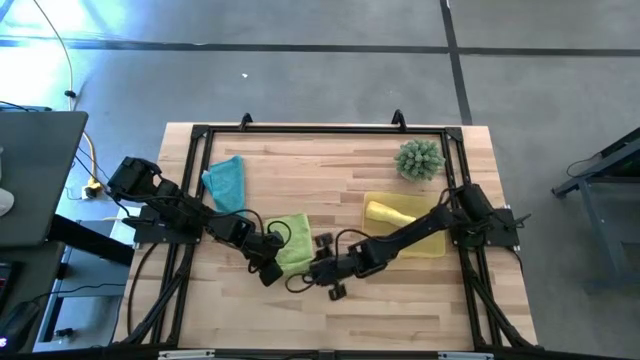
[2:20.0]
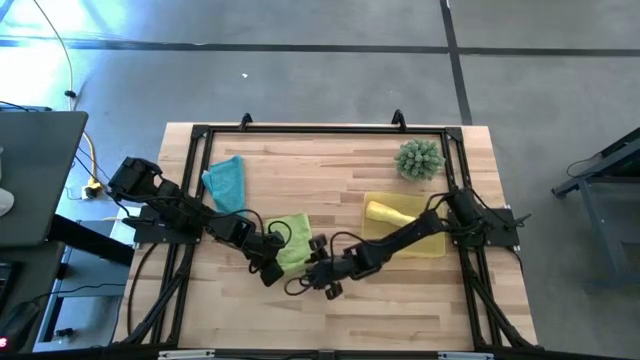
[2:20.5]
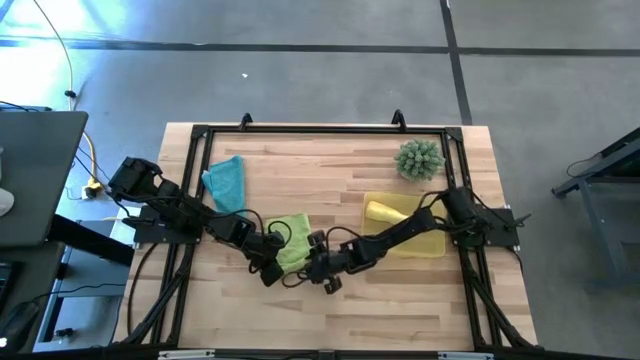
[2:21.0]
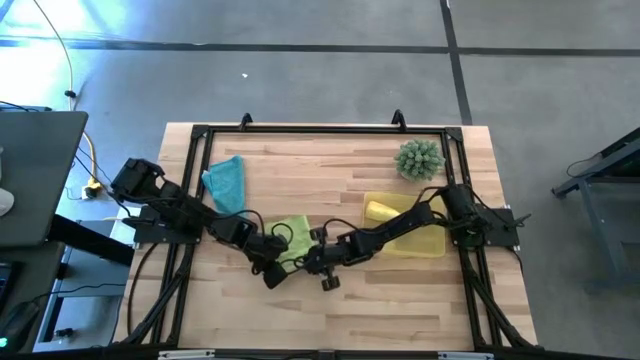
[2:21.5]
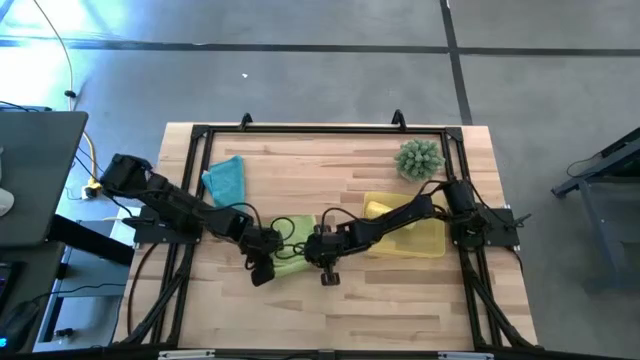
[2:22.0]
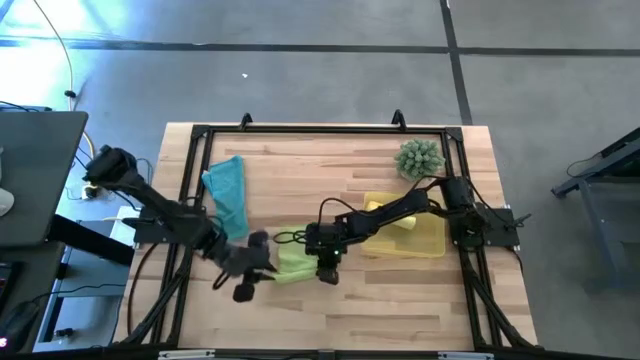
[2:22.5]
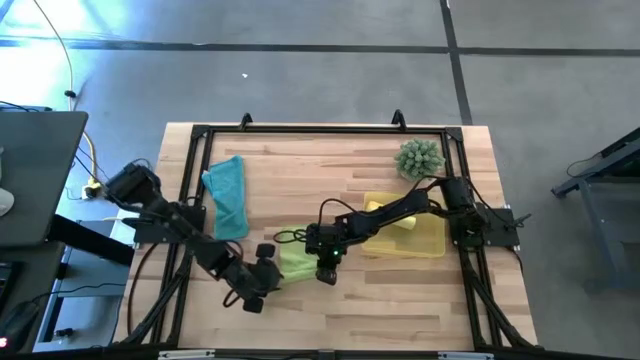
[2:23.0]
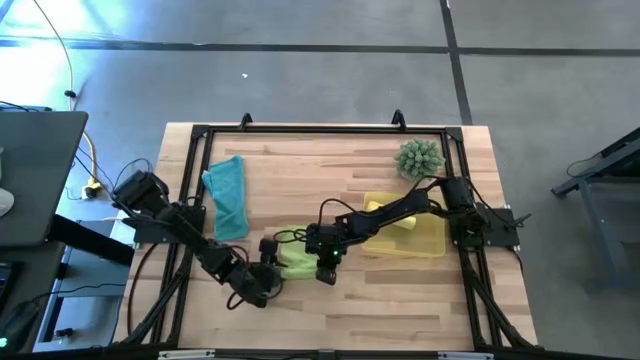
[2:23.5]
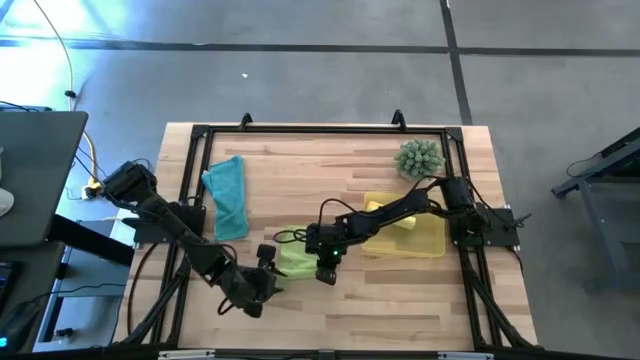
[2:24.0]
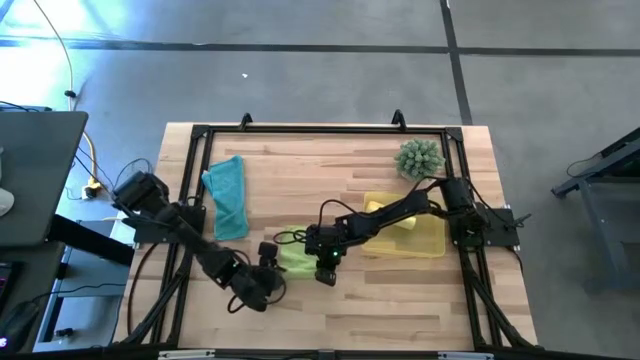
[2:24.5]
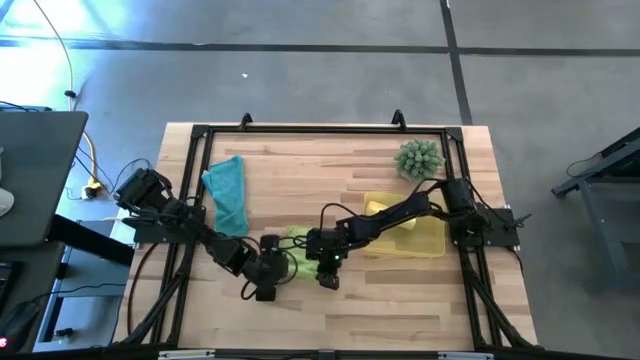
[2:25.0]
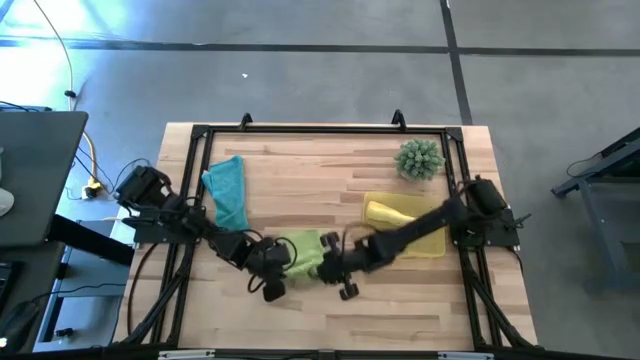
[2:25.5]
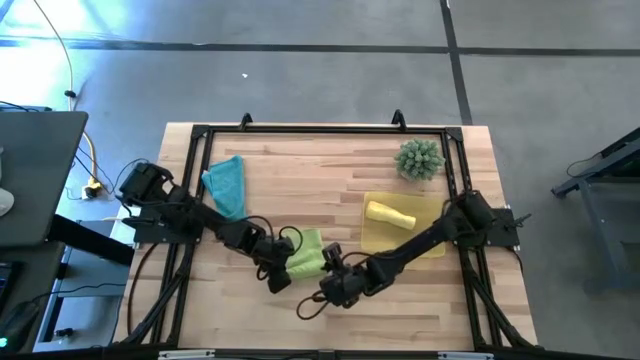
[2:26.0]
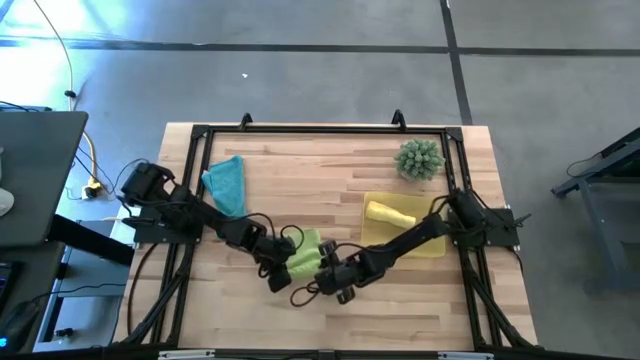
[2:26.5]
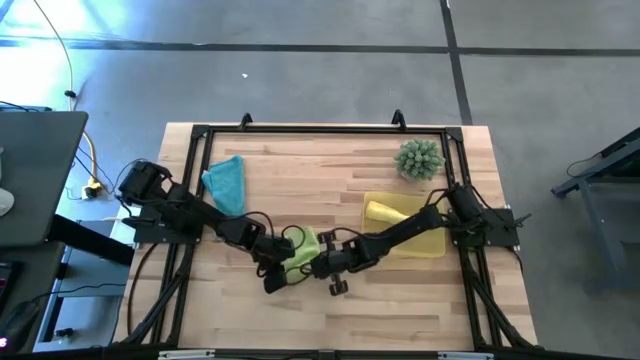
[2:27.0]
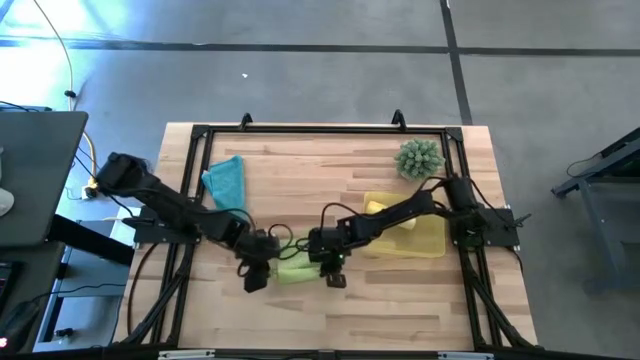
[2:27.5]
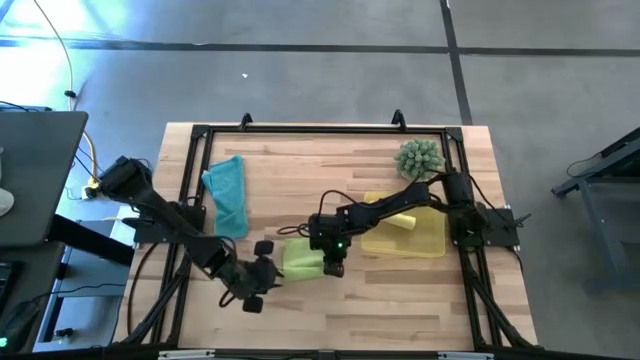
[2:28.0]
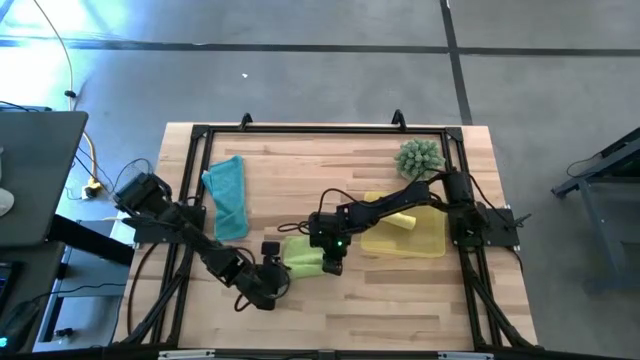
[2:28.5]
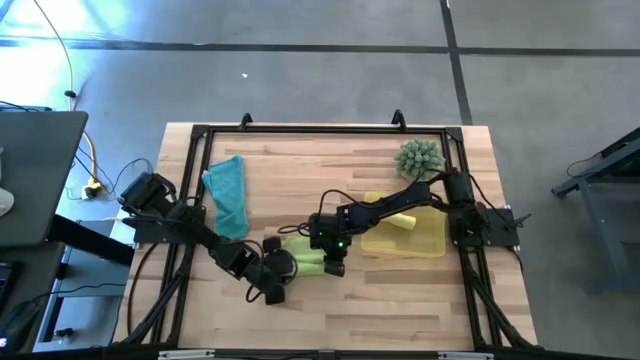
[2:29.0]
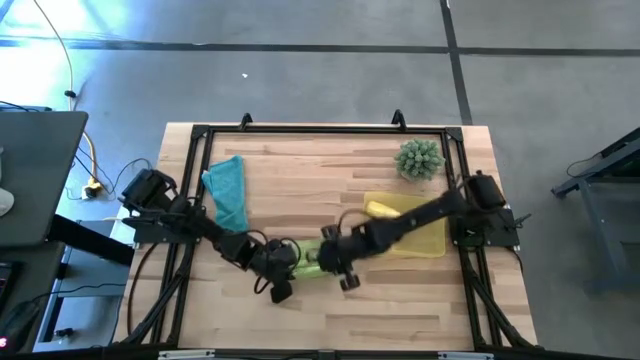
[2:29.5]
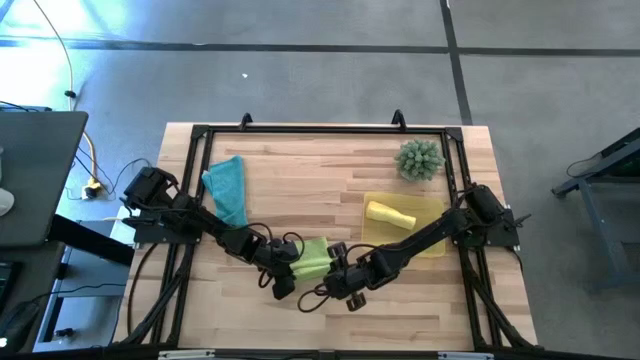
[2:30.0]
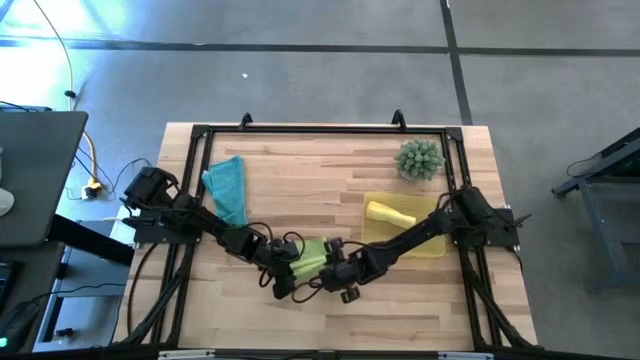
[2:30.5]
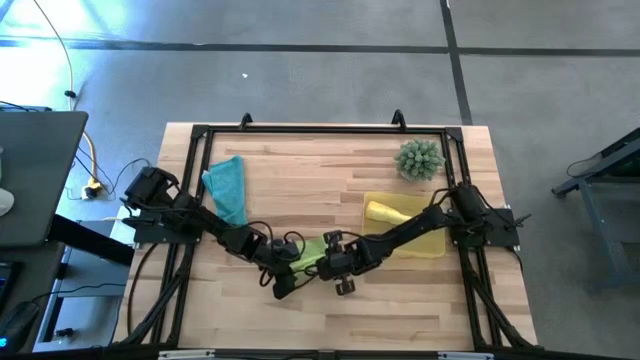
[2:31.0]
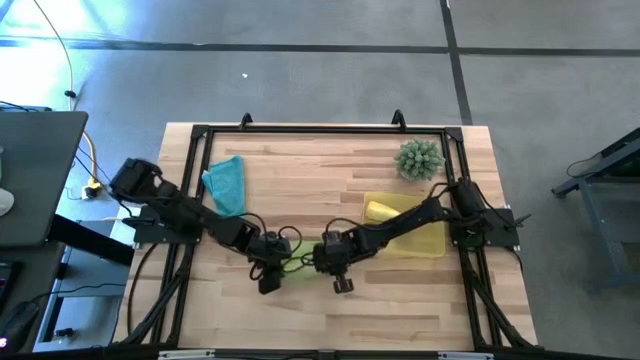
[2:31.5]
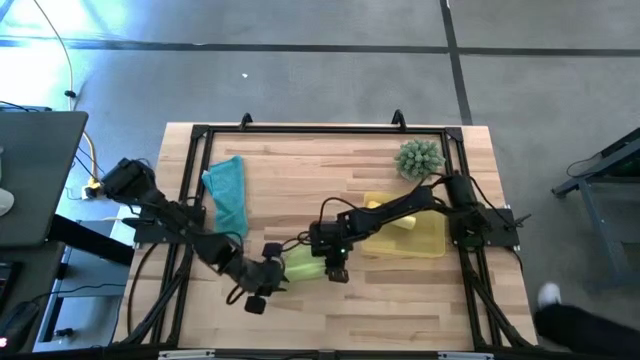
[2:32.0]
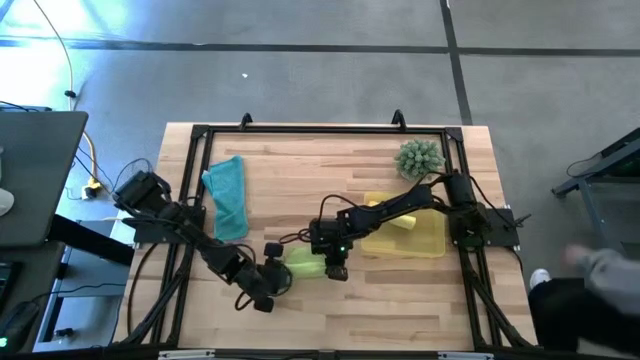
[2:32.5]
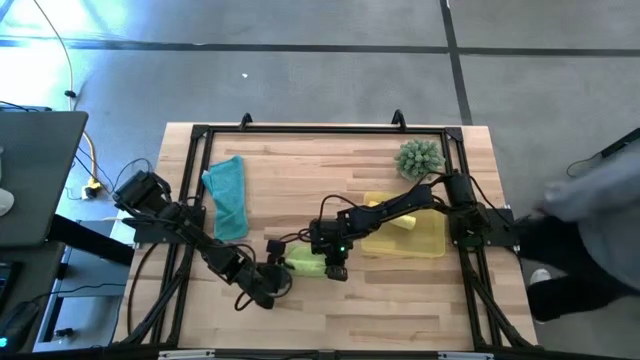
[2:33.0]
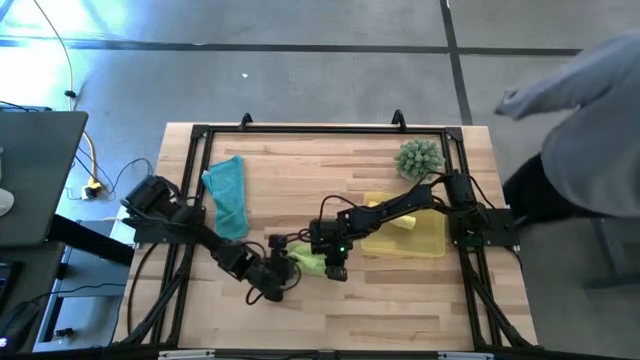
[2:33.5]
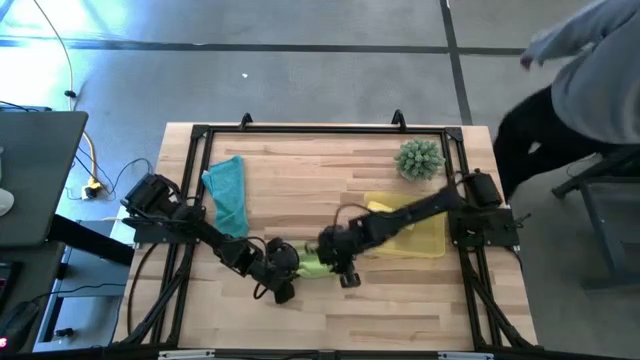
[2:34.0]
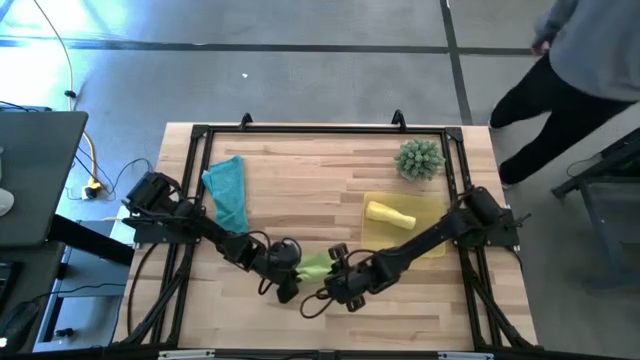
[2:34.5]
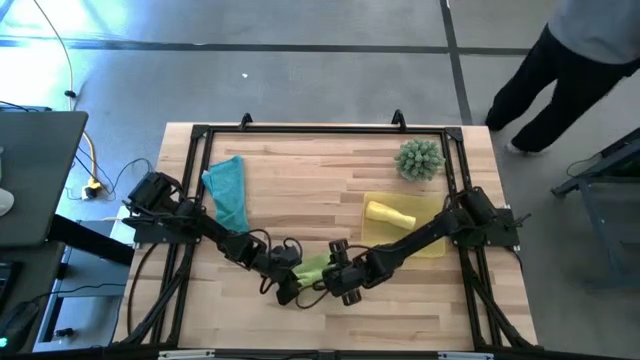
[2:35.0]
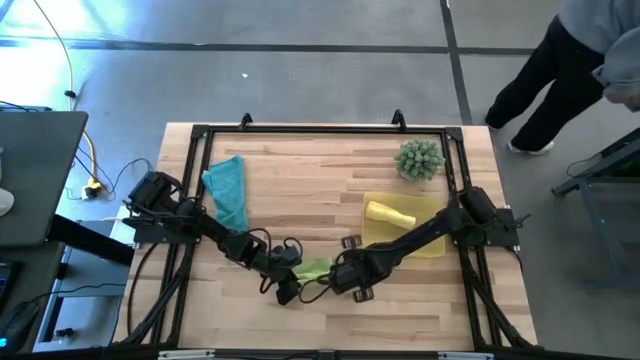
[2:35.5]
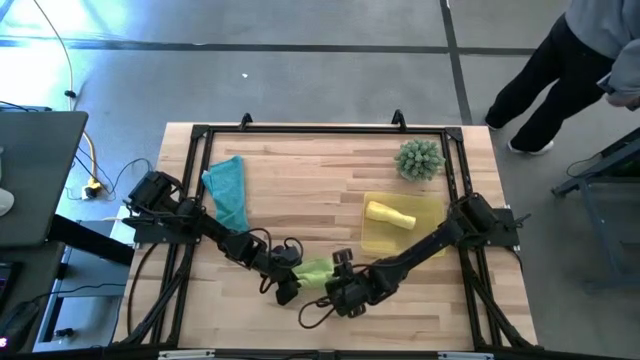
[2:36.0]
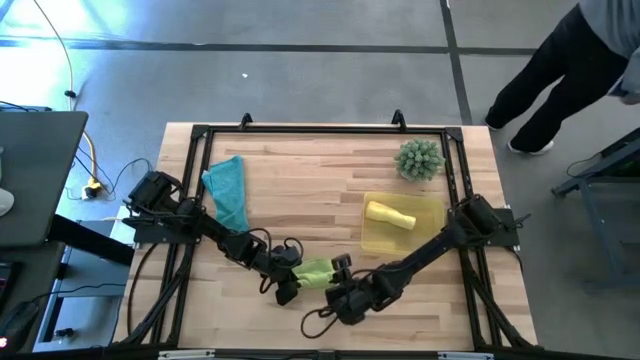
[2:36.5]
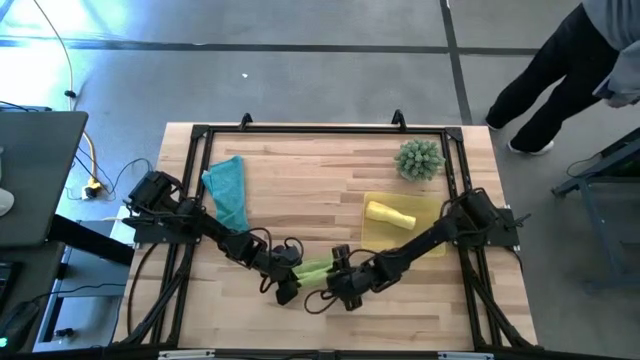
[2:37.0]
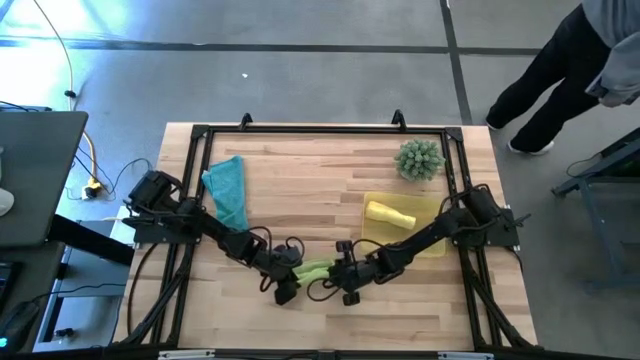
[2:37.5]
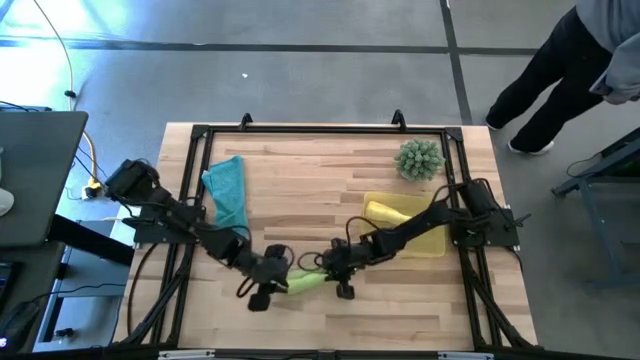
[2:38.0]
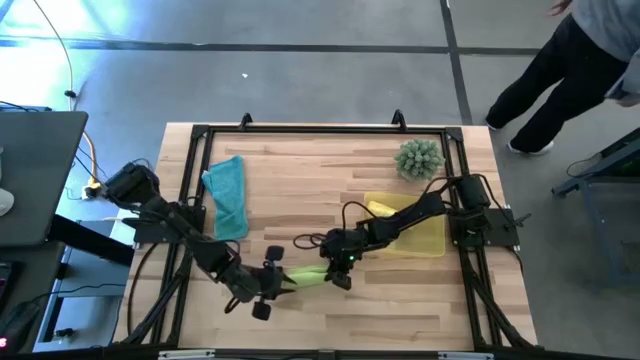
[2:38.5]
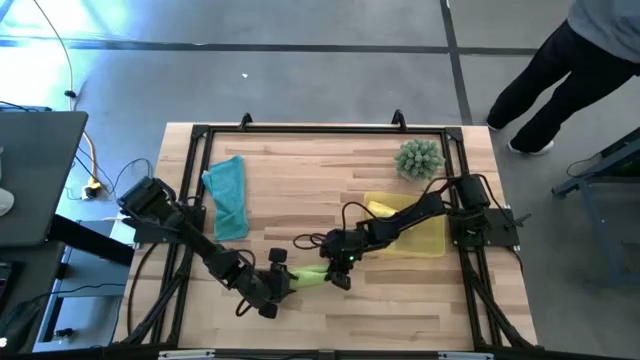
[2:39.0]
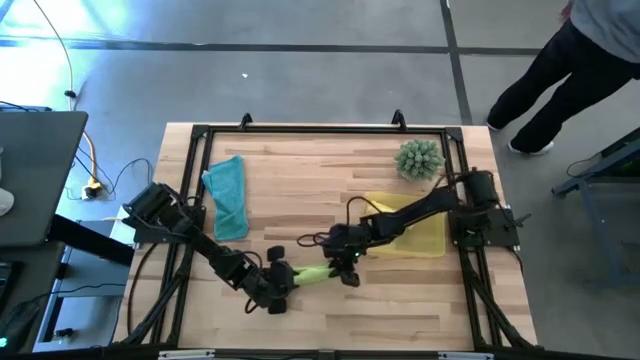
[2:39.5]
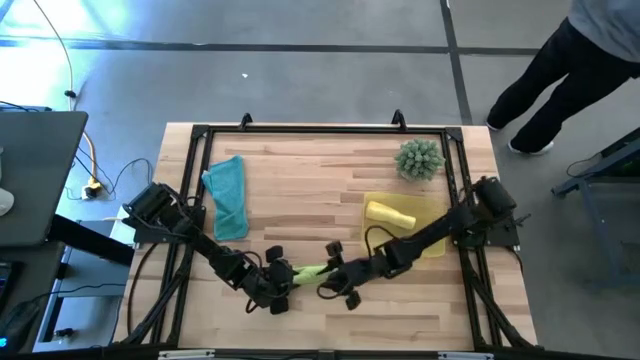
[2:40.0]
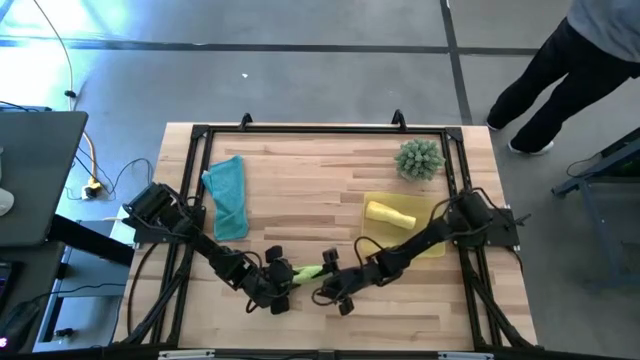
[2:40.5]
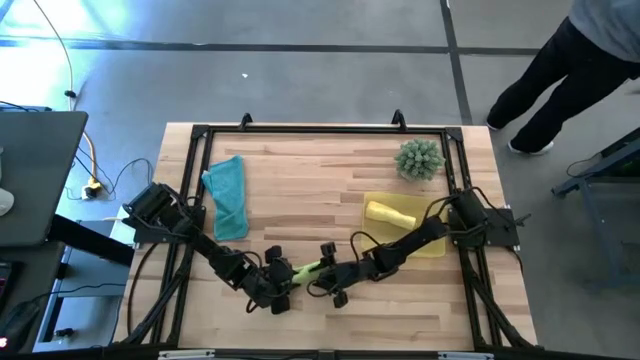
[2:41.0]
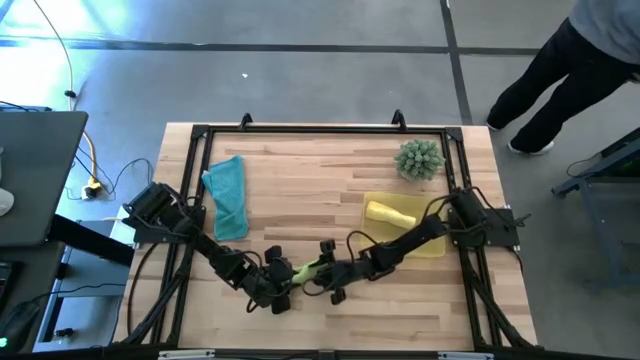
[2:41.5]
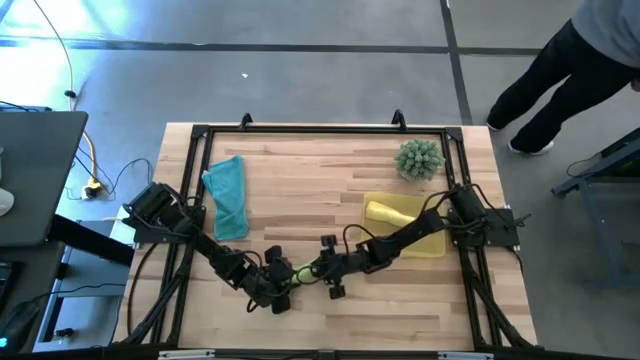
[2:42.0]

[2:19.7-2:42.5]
Task: Roll microfiber towels into tight, uniform cylinder then place into a basket
Roll the green microfiber towel

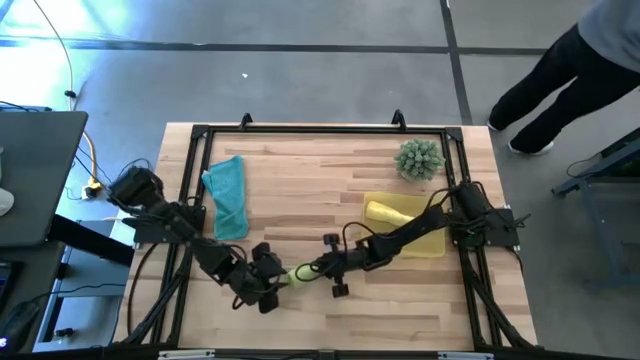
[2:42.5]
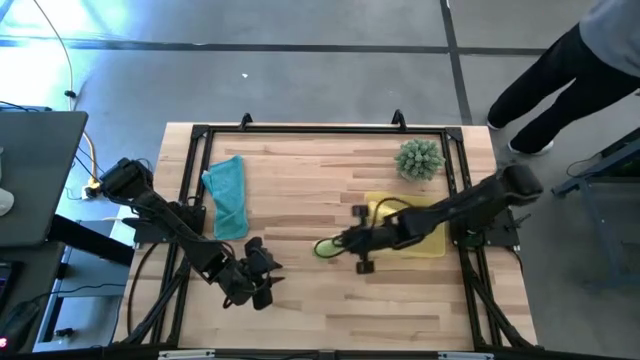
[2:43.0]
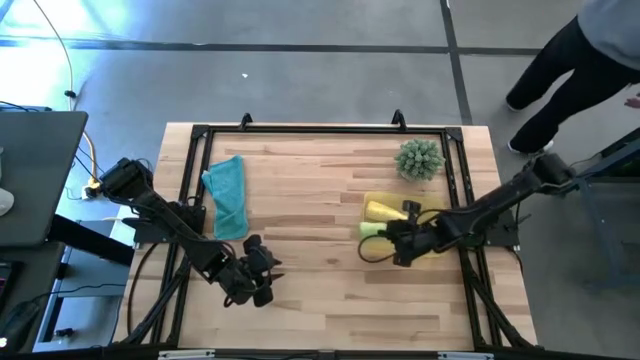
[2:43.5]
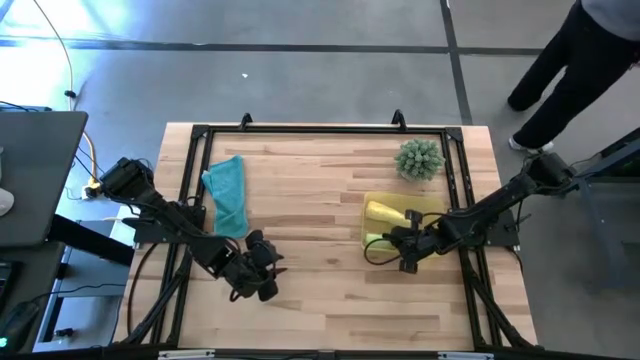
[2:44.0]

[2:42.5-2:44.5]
Put the green microfiber towel into the yellow bin
